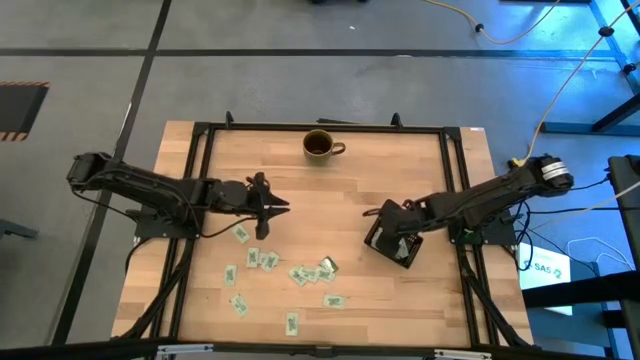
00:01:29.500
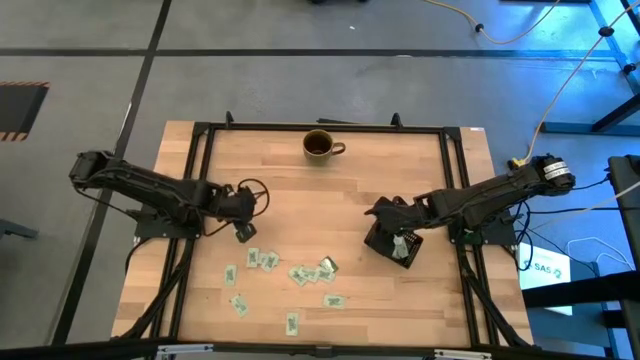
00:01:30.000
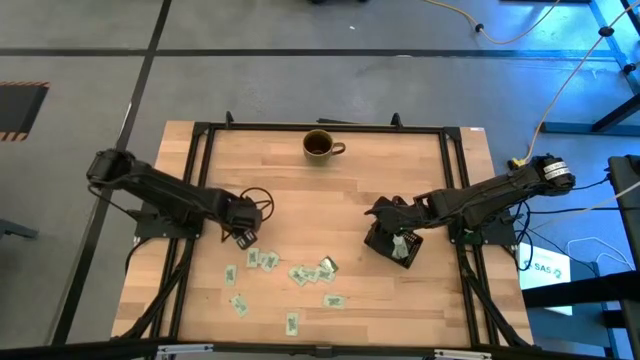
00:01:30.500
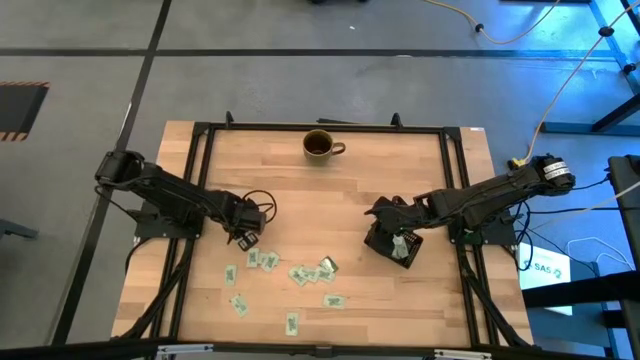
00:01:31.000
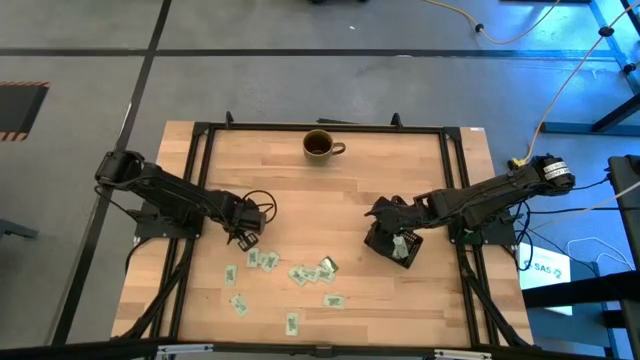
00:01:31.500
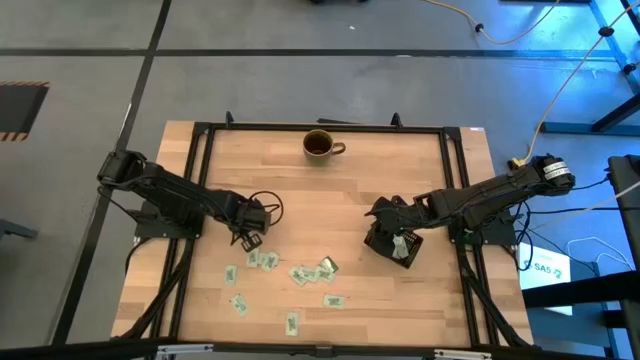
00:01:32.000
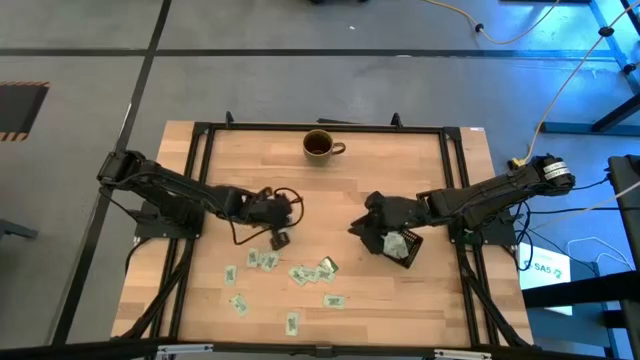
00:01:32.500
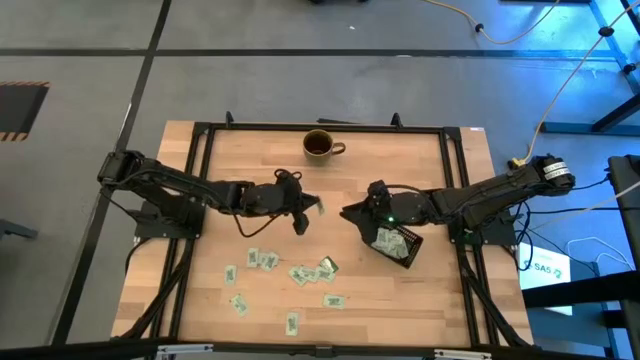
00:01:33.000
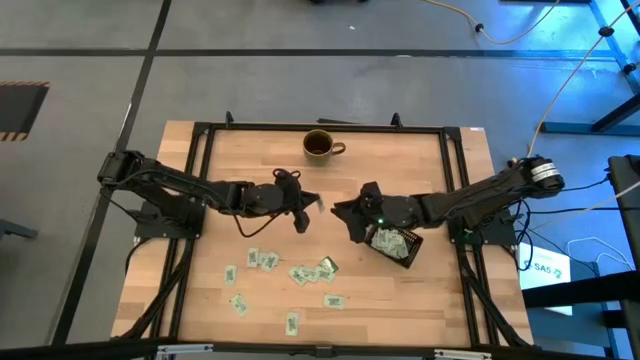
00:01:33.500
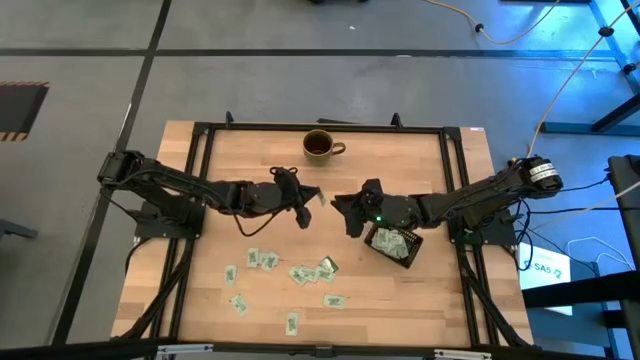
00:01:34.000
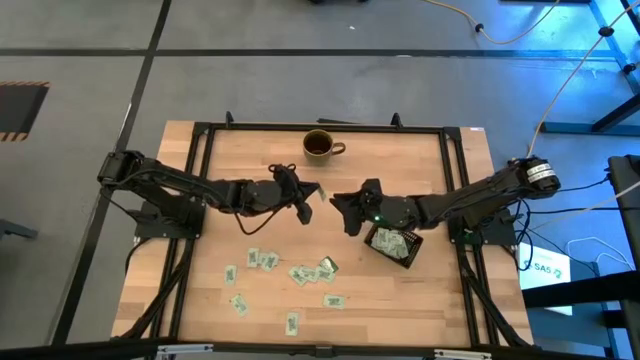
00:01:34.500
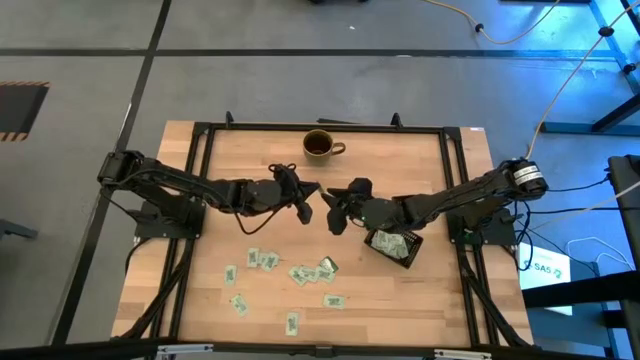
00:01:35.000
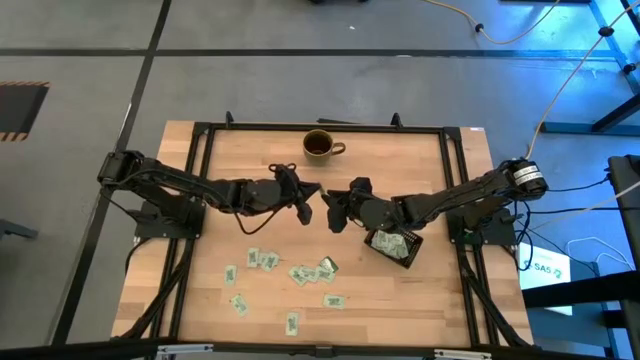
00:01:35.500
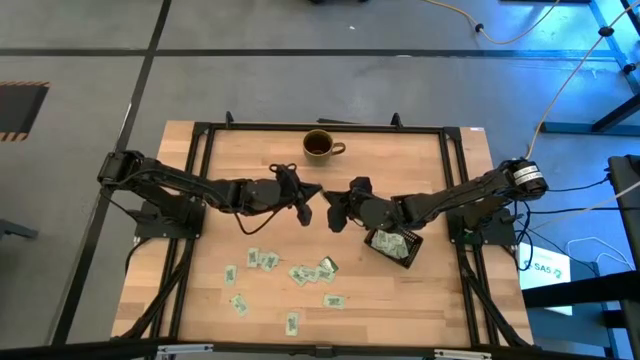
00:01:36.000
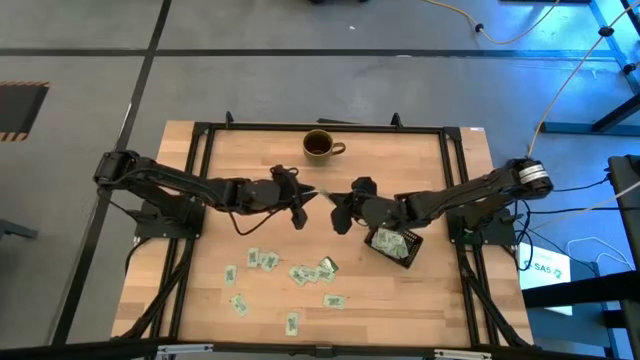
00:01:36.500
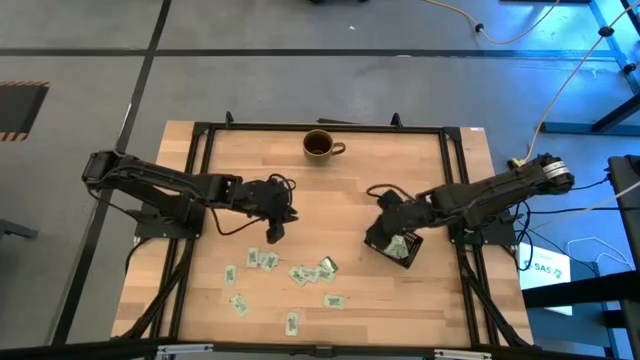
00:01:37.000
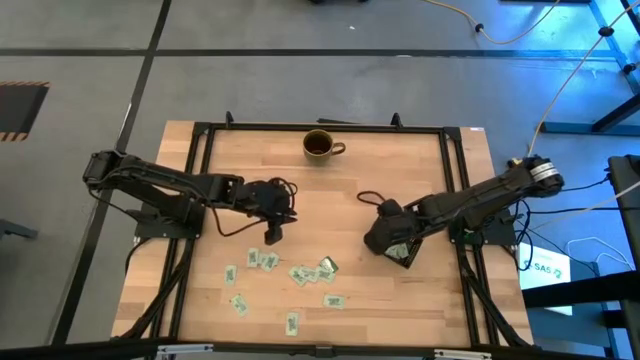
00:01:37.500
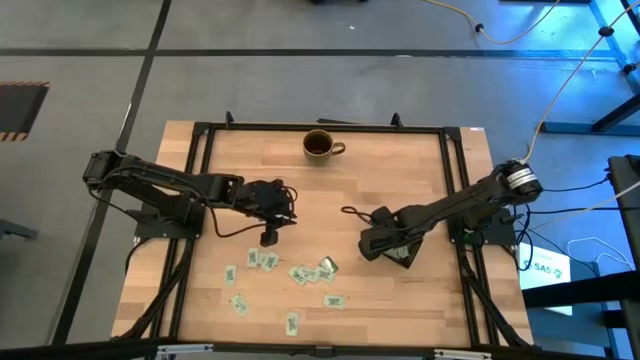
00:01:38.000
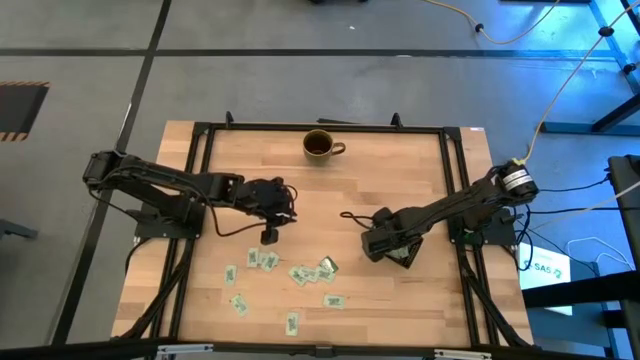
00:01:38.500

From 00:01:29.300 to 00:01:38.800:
Task: Pick and place Stevia / Truvia into bins
Put the stevia packet into the black bin

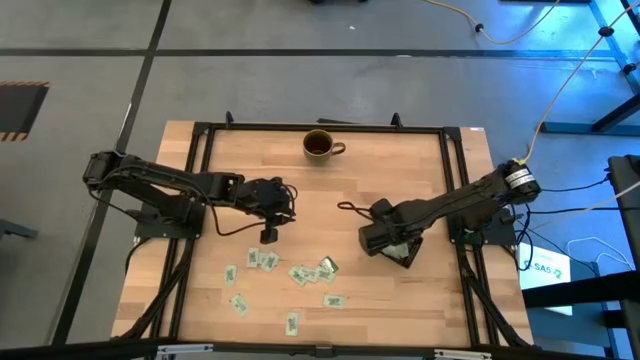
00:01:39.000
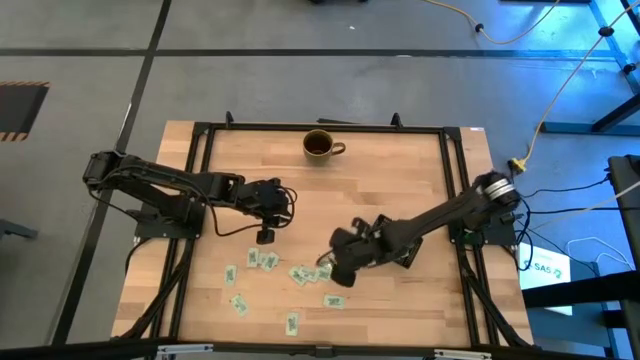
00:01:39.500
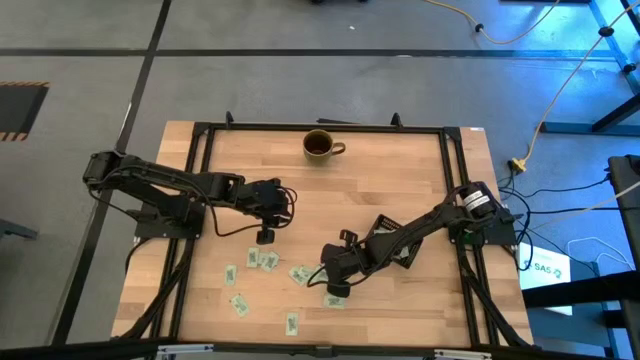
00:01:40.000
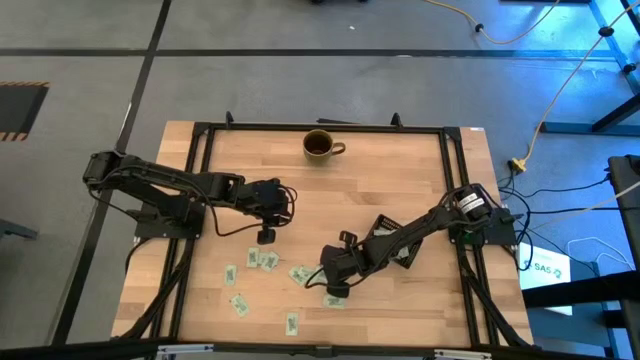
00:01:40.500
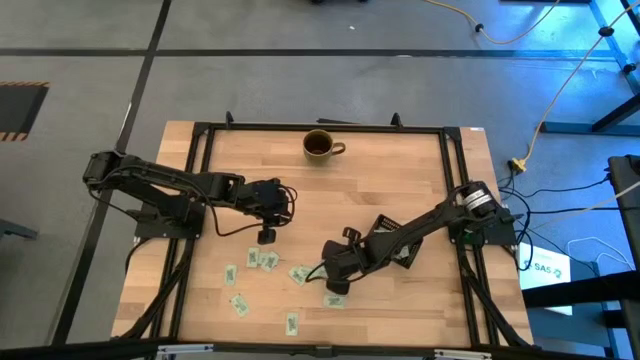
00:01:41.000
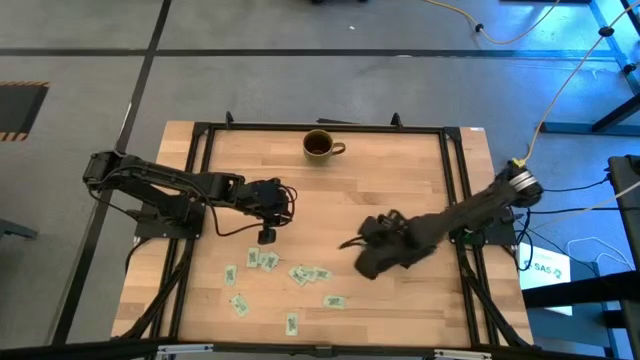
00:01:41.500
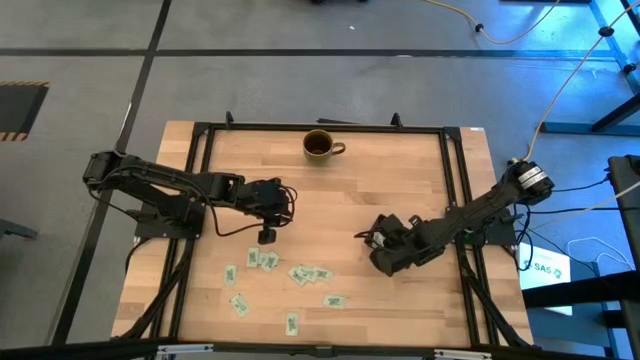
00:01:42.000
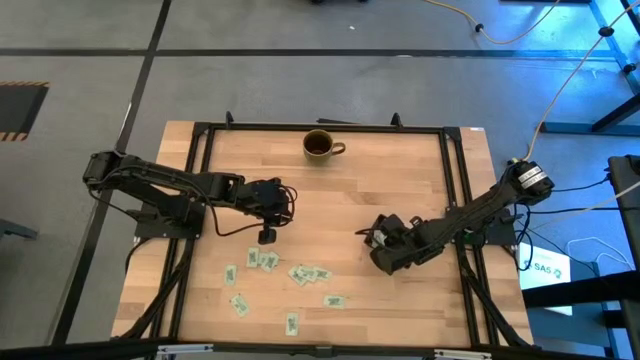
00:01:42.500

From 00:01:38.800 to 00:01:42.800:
Put the truvia packet into the black bin

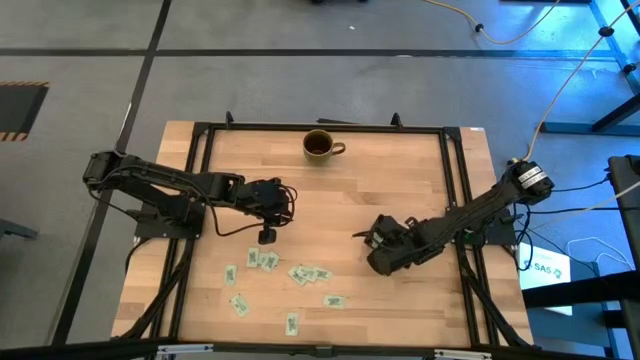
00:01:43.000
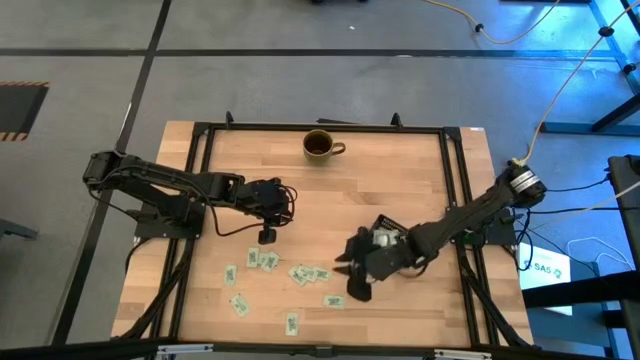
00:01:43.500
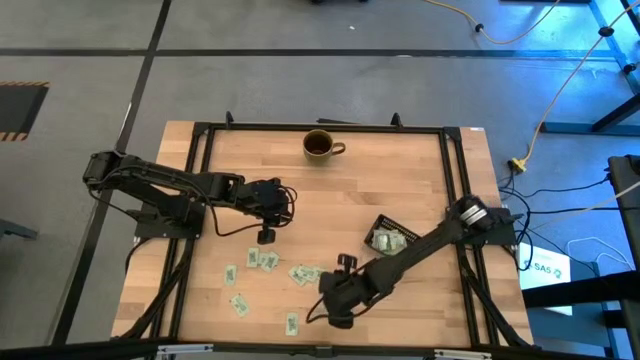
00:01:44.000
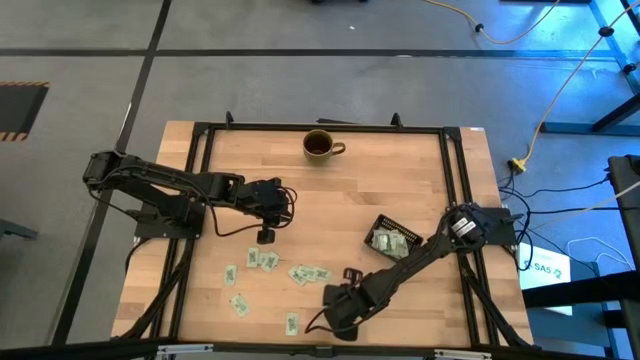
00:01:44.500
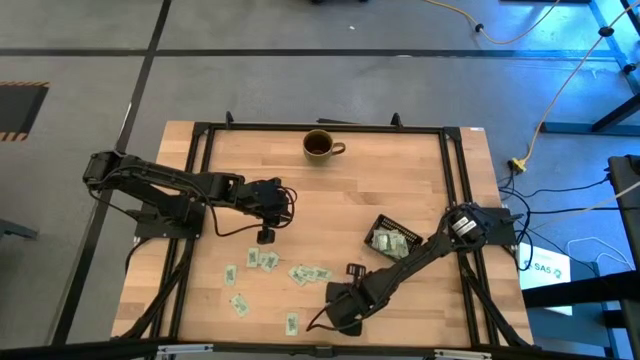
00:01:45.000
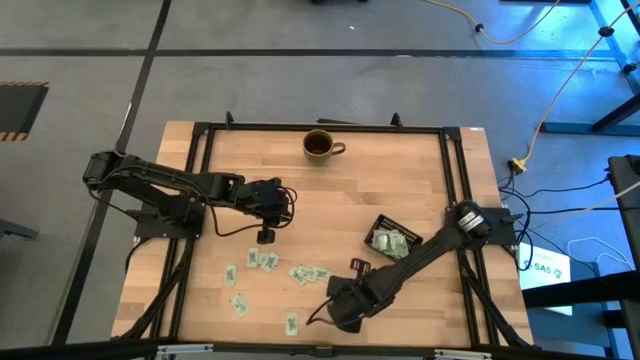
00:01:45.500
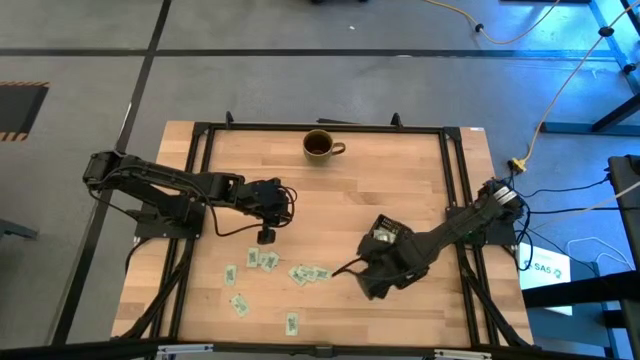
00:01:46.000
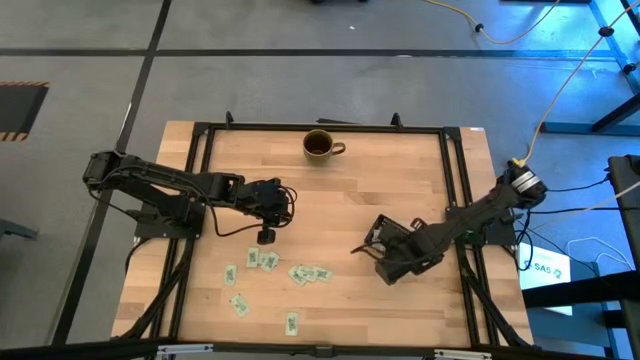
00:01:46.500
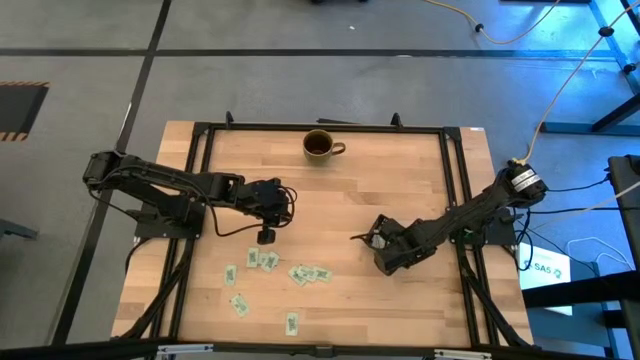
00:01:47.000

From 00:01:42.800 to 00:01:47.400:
Put the stevia packet into the black bin

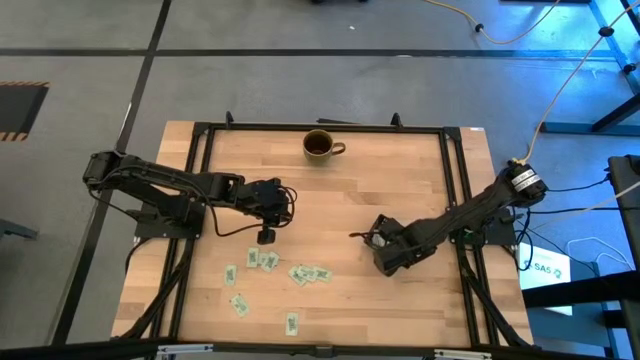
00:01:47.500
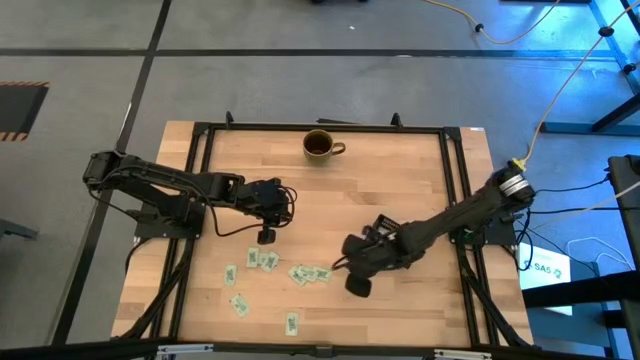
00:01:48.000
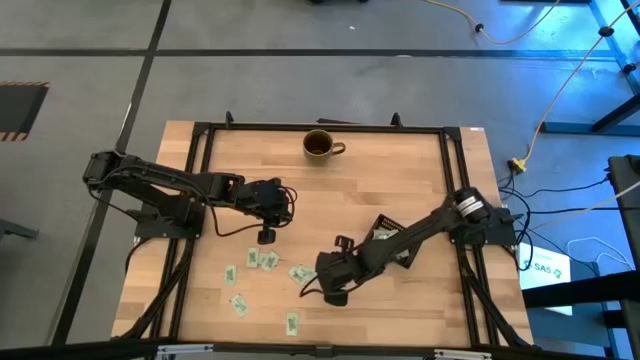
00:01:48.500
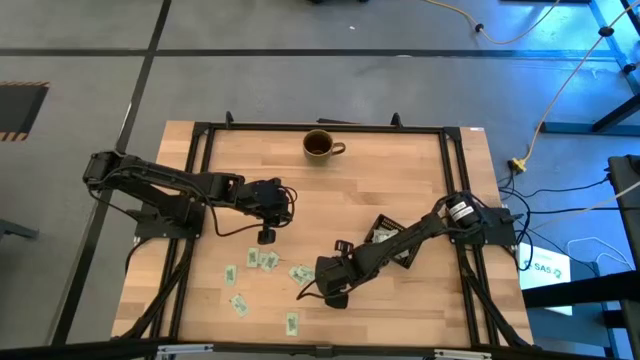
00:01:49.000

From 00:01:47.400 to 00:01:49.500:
Put the stevia packet into the black bin

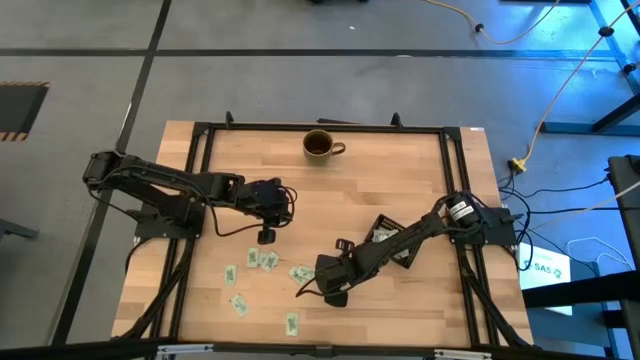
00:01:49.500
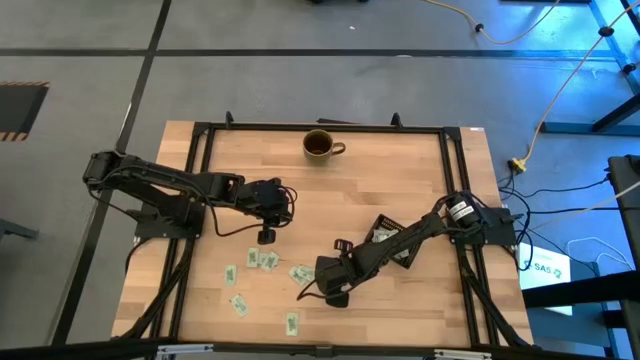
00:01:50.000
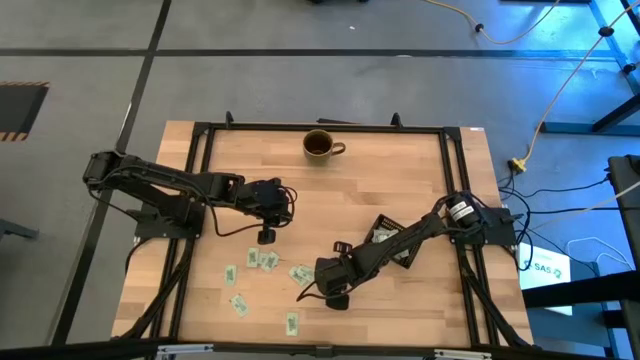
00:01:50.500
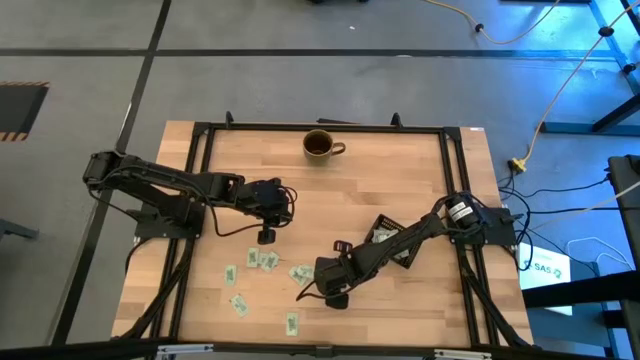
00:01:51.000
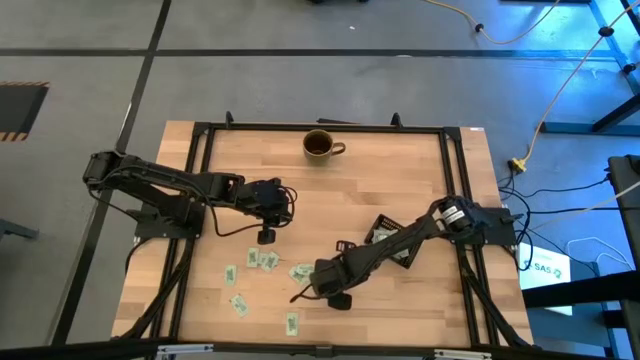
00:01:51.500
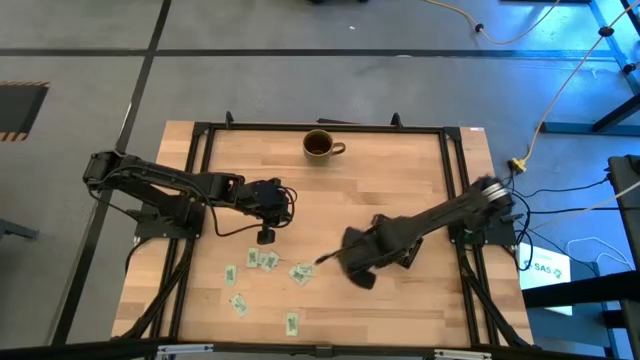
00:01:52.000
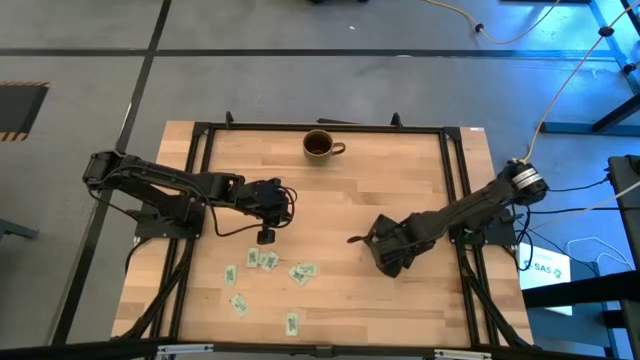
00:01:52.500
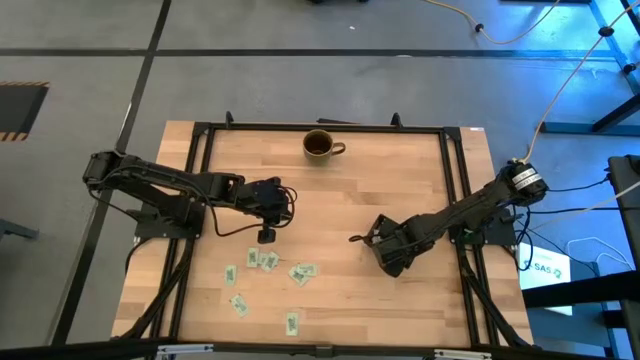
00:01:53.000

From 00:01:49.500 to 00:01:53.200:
Put the stevia packet into the black bin
